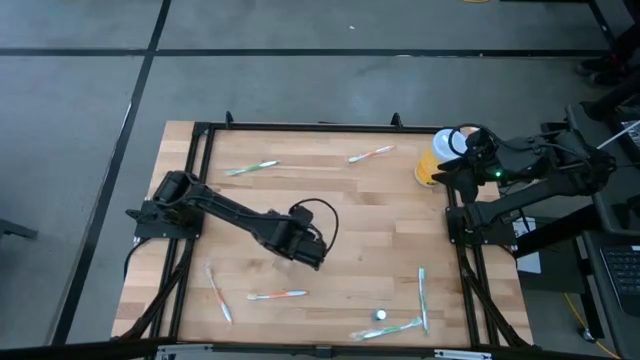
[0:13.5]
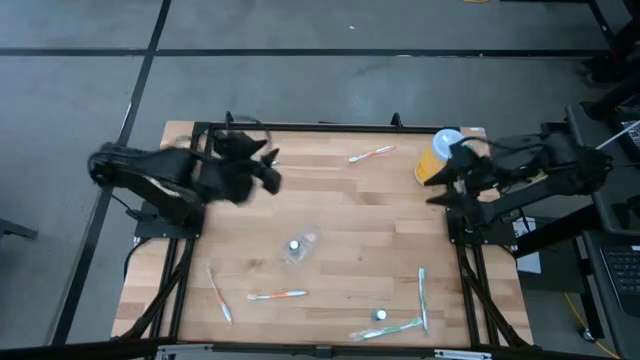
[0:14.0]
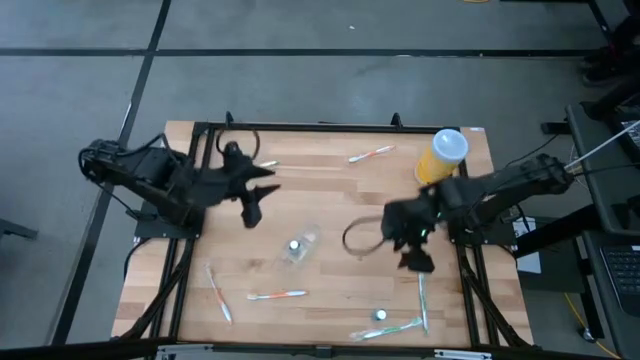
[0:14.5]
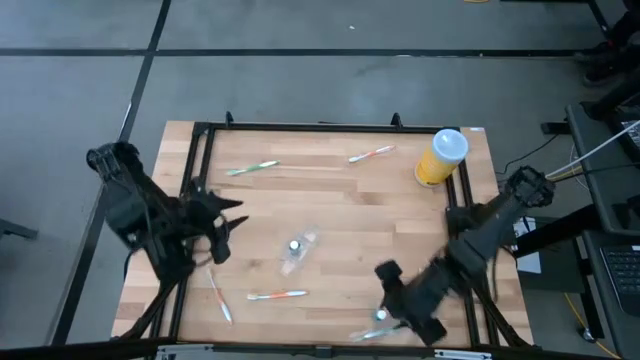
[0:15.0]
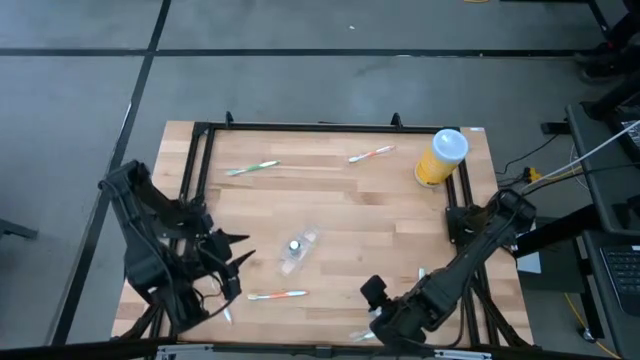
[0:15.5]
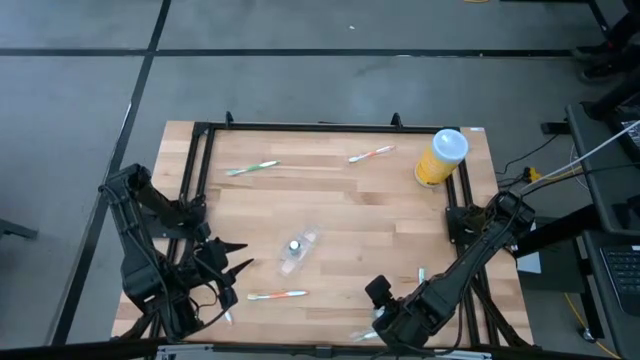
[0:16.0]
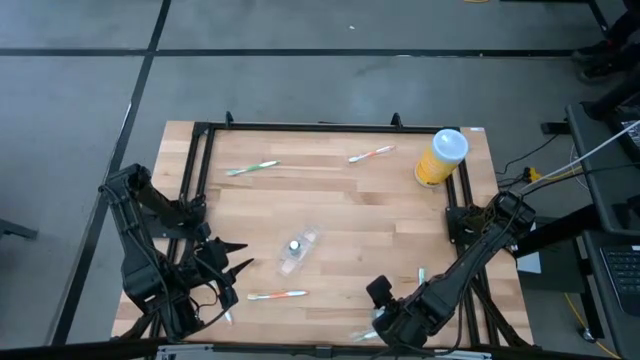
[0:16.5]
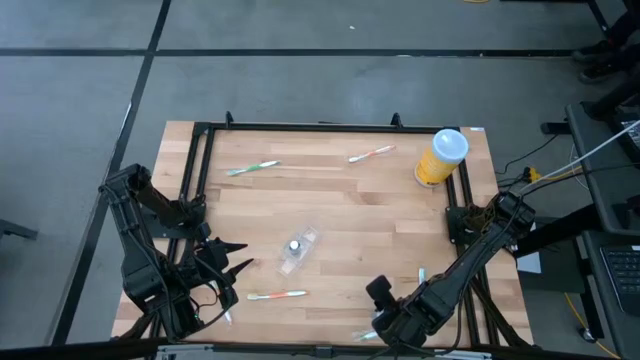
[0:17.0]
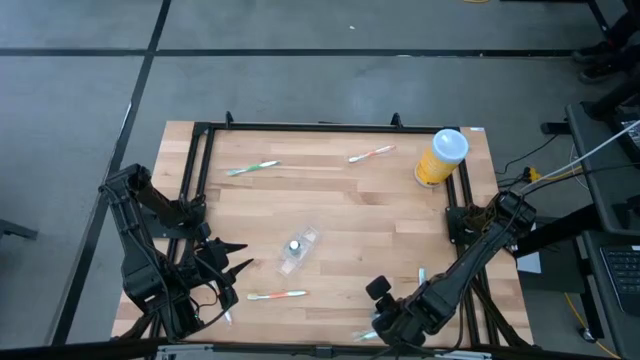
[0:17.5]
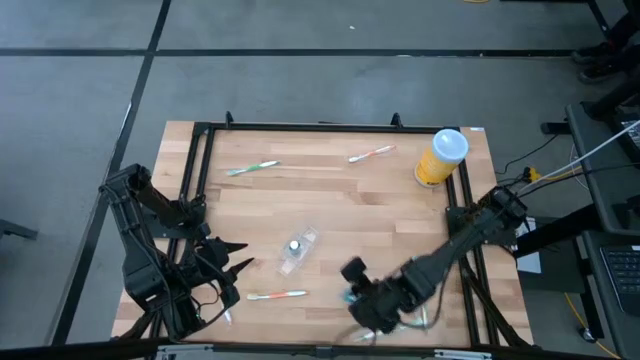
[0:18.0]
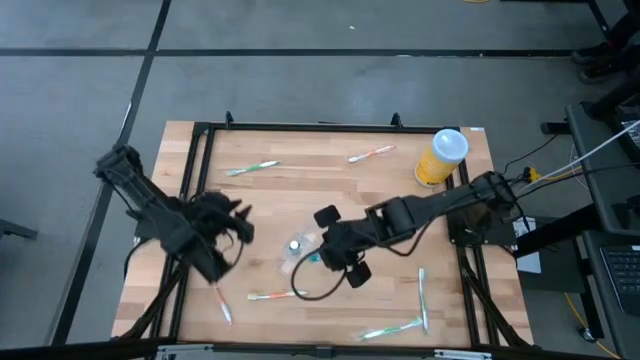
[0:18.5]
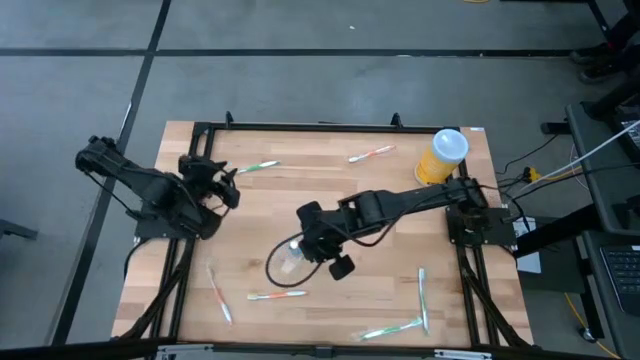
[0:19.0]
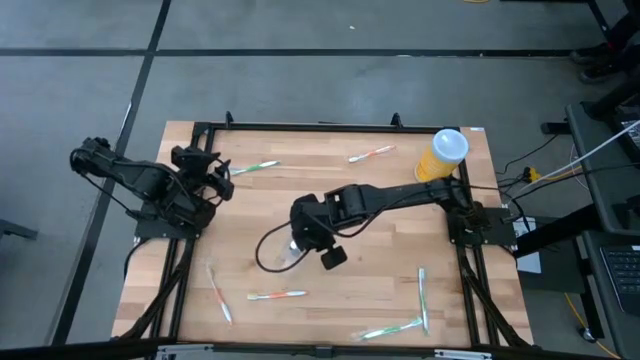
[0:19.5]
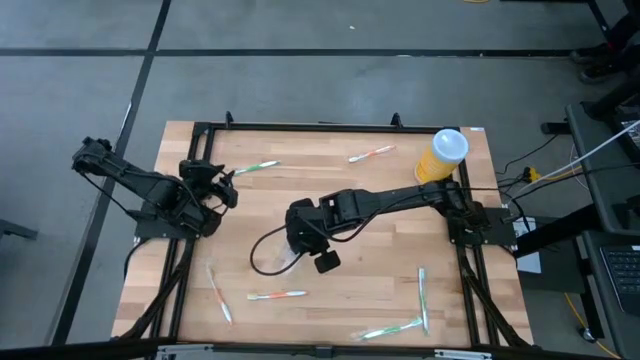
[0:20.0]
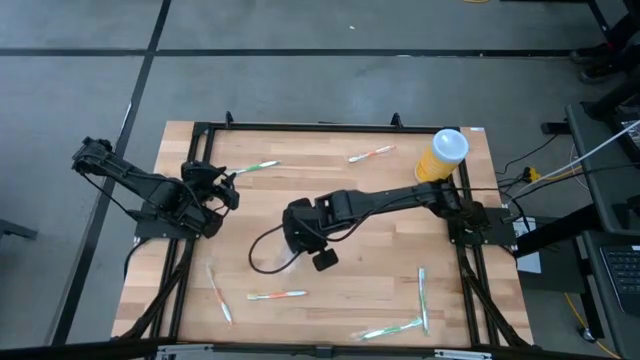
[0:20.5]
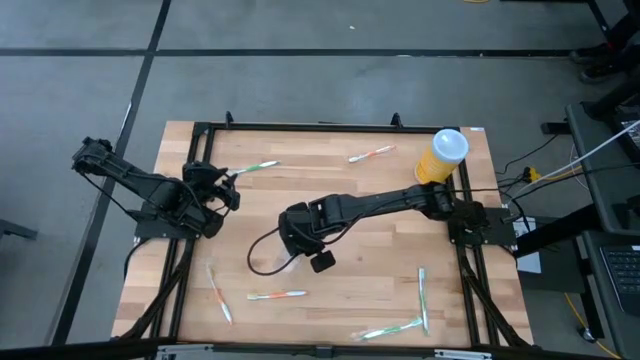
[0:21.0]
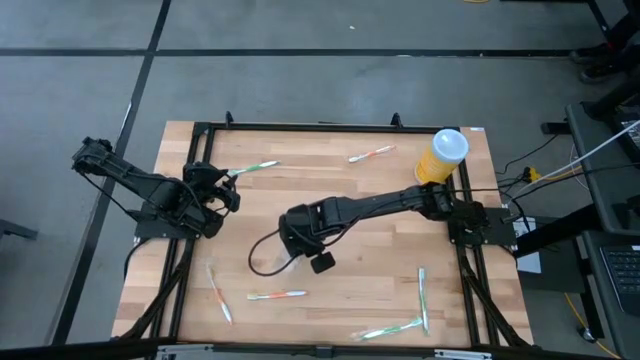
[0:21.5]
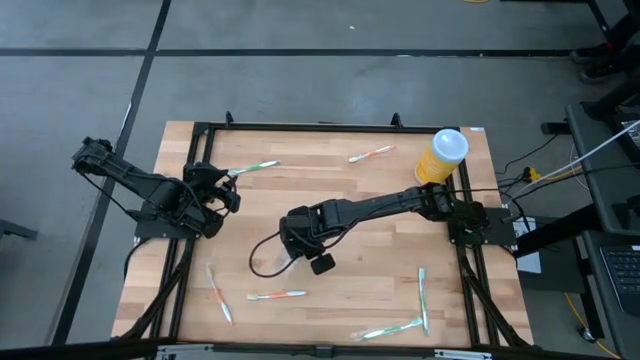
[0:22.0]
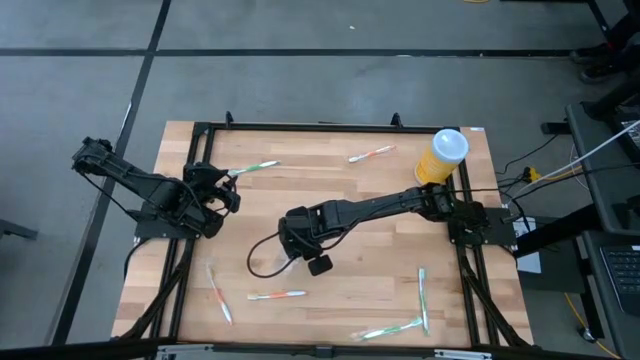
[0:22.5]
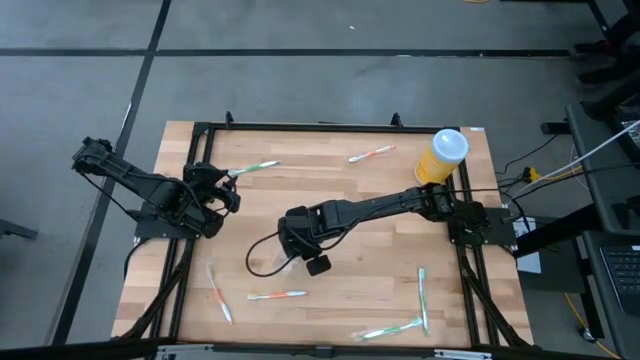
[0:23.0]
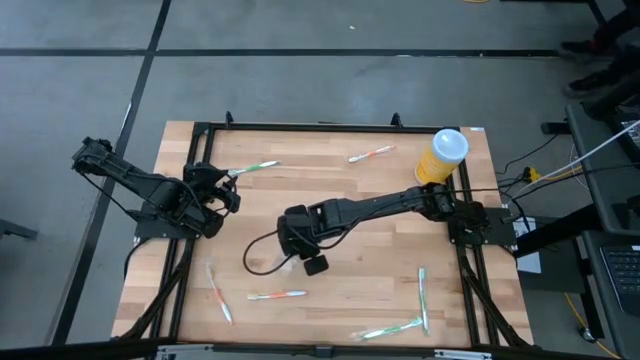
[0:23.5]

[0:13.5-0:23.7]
Task: Pick & Place toothbrushing station
Put the mouthwash into the transparent organizer

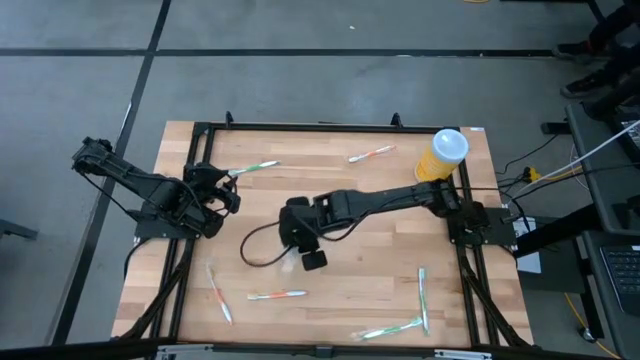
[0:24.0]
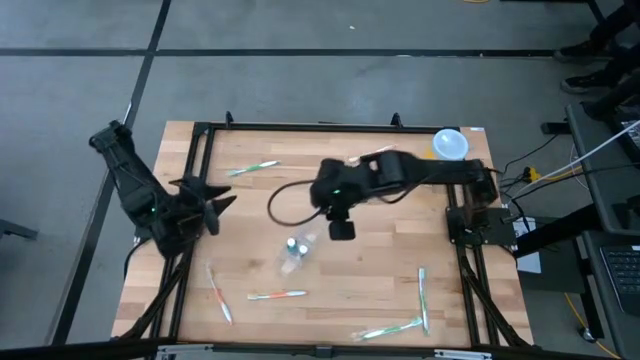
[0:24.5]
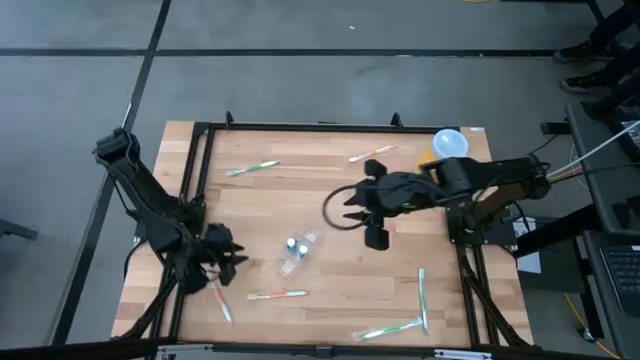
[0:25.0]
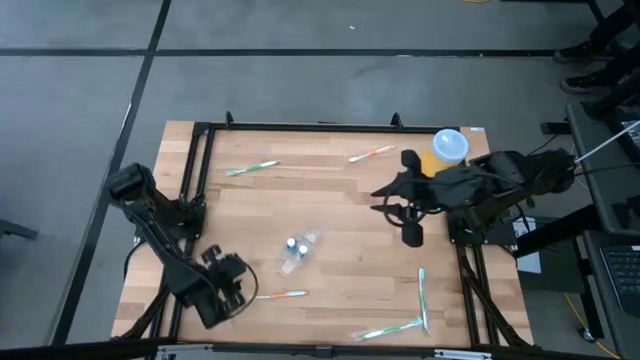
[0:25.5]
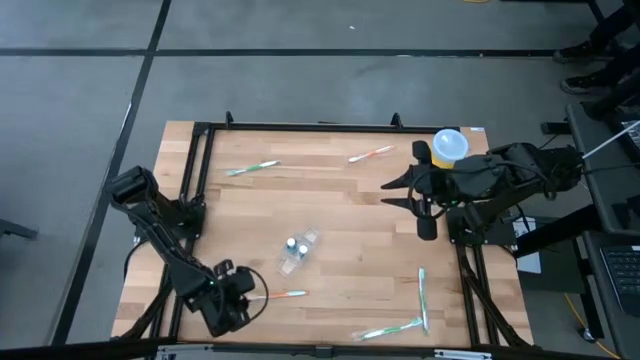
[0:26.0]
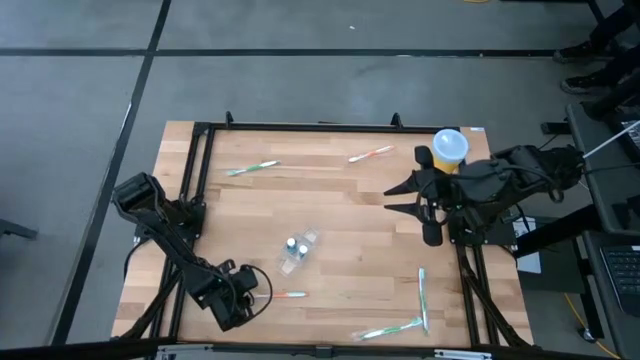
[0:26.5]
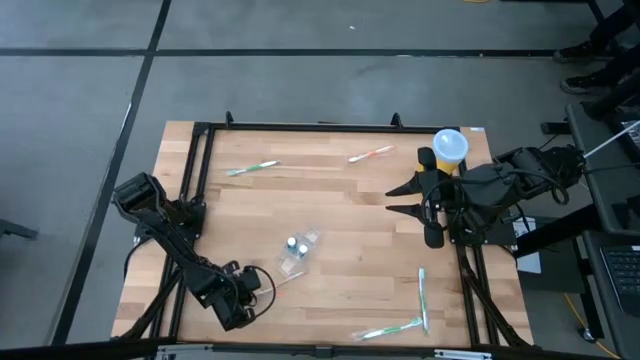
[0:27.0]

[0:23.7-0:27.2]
Put the bottom orange toothbrush into the transparent organizer

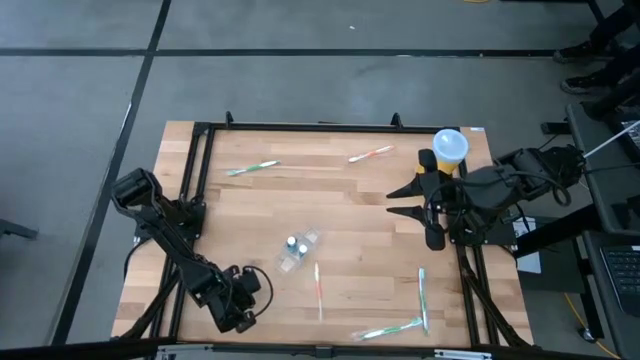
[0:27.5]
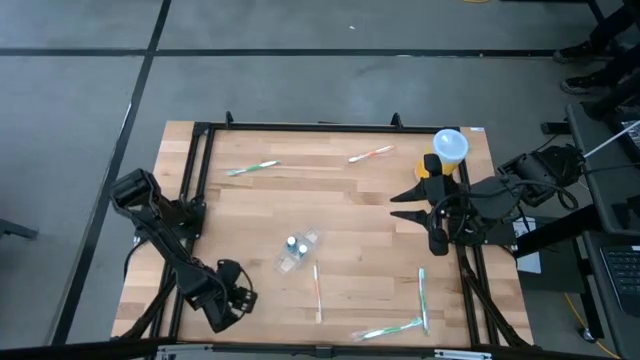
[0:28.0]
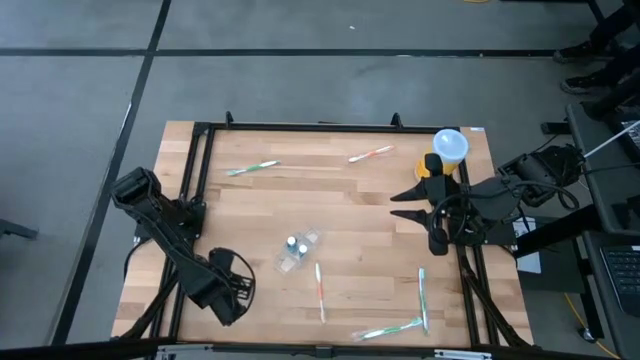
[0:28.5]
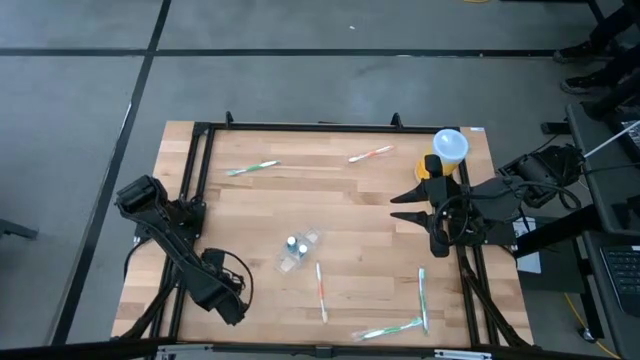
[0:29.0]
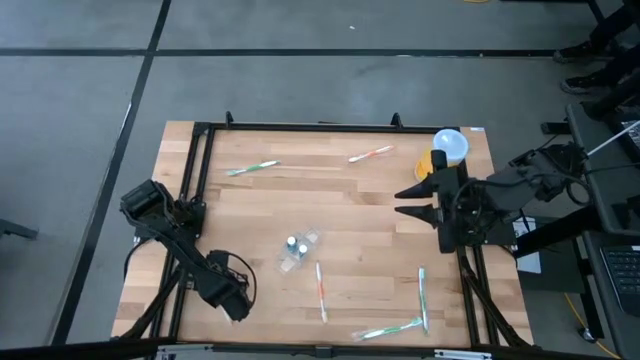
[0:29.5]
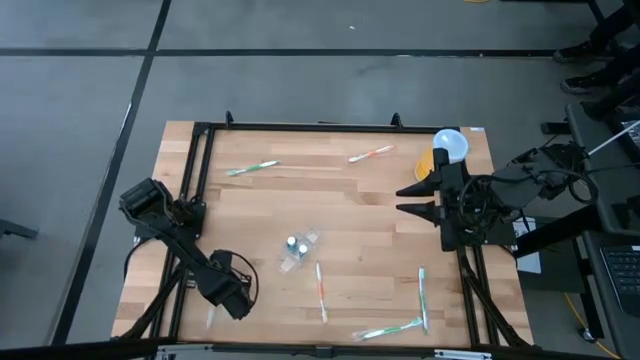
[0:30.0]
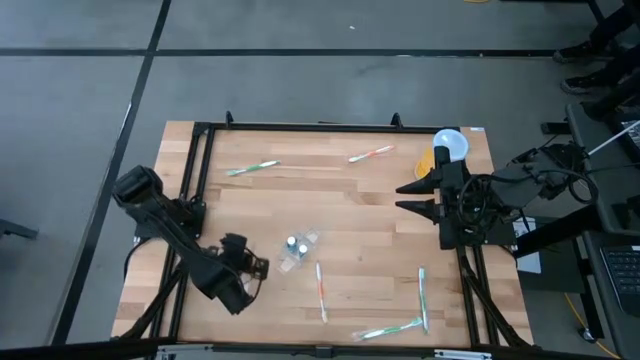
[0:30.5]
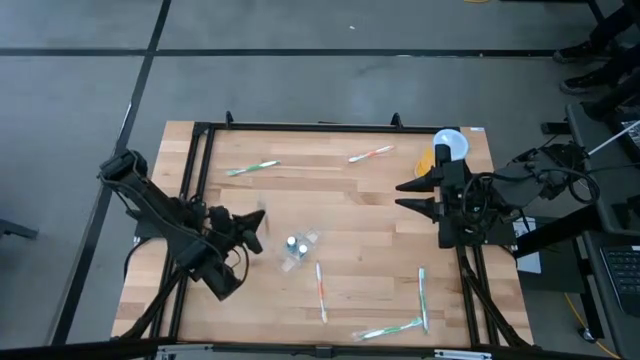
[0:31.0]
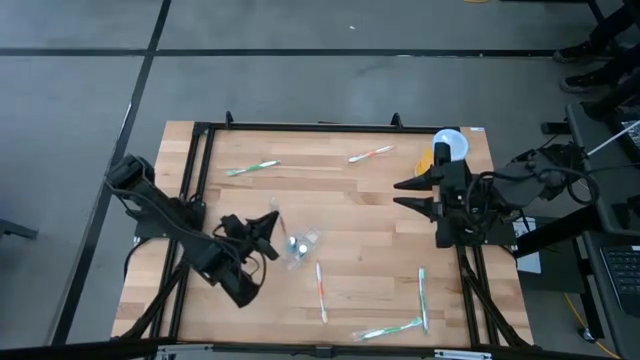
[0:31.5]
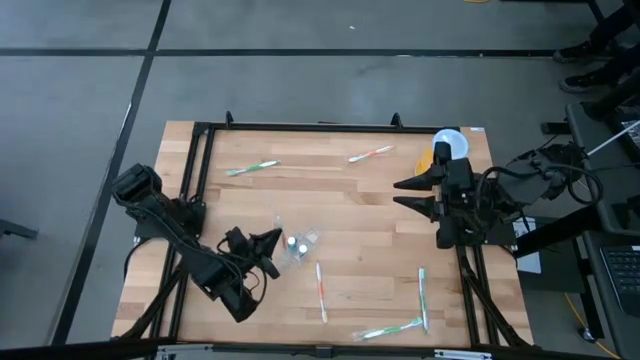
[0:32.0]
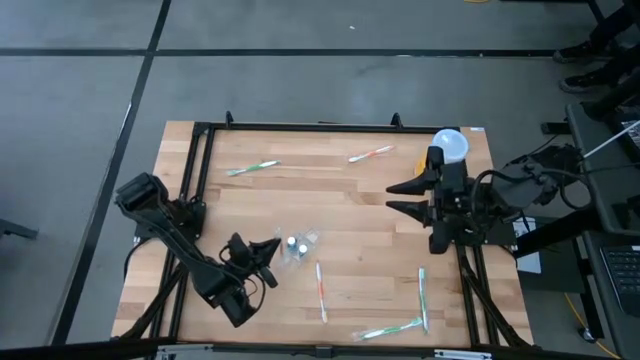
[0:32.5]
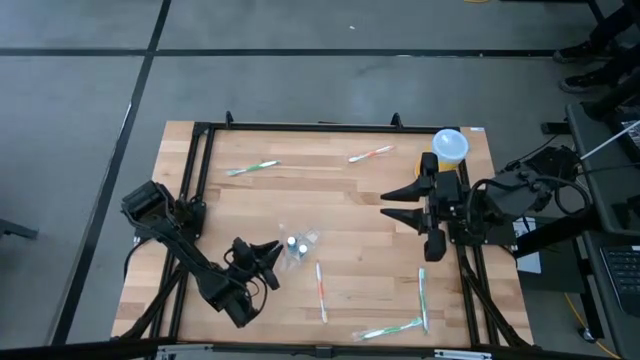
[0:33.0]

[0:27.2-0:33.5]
Put the bottom left orange toothbrush into the transparent organizer

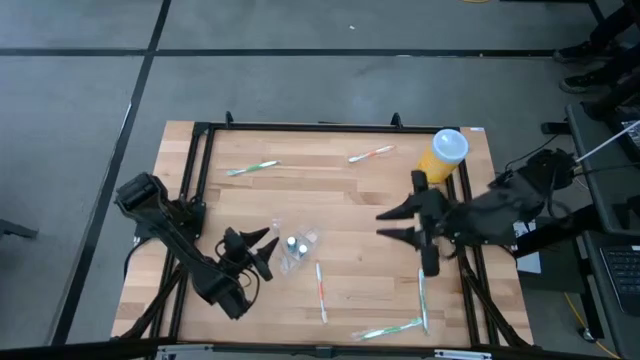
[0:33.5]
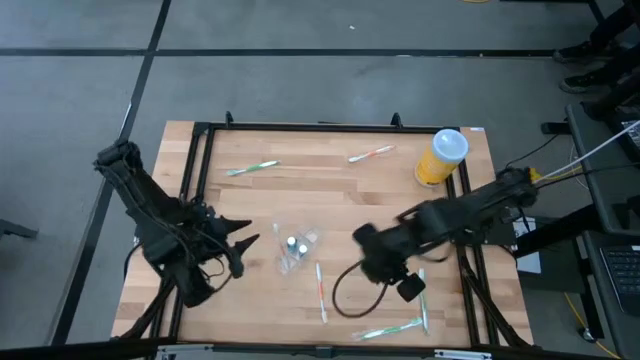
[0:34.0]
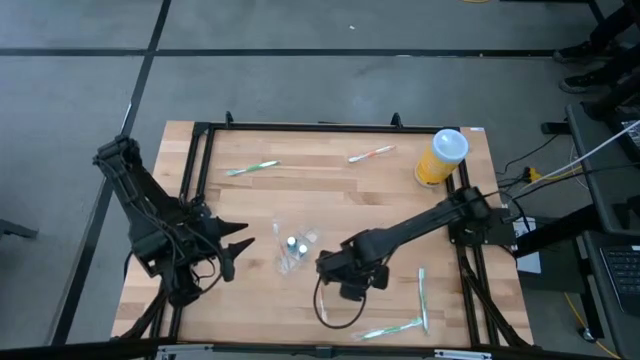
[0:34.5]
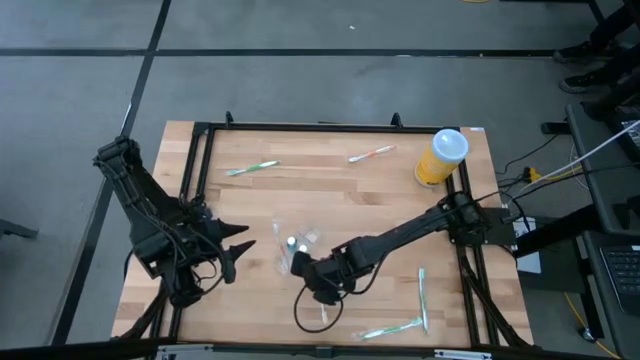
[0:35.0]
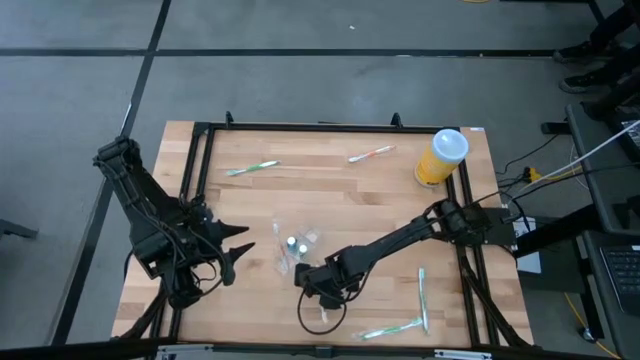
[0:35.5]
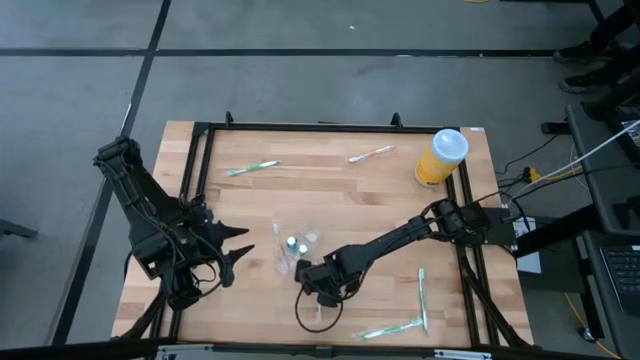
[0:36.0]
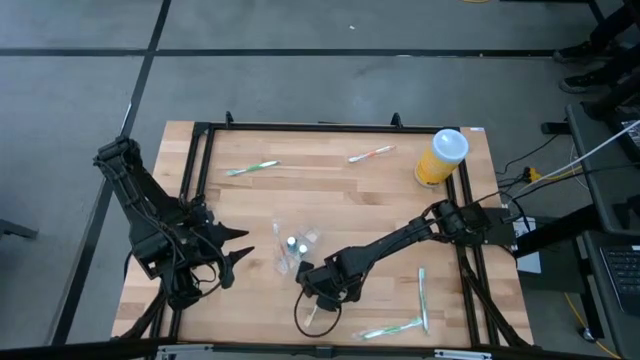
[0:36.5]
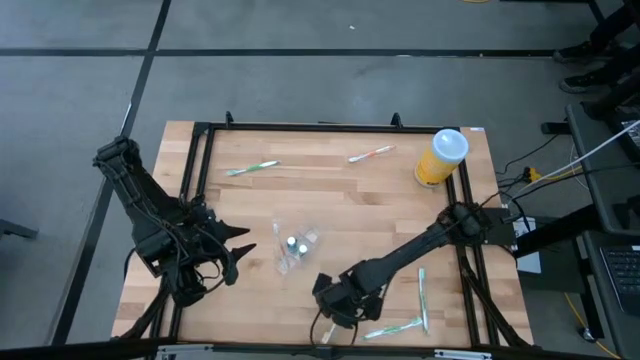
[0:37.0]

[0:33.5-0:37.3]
Put the bottom orange toothbrush into the transparent organizer
